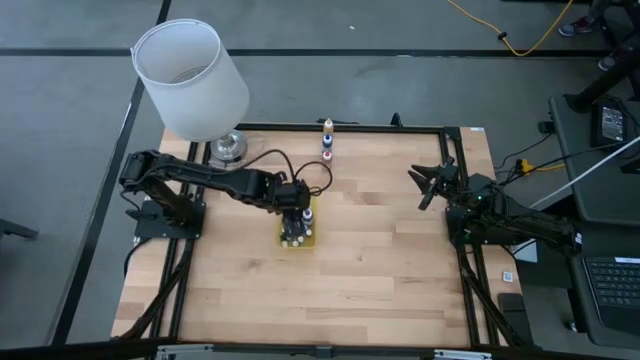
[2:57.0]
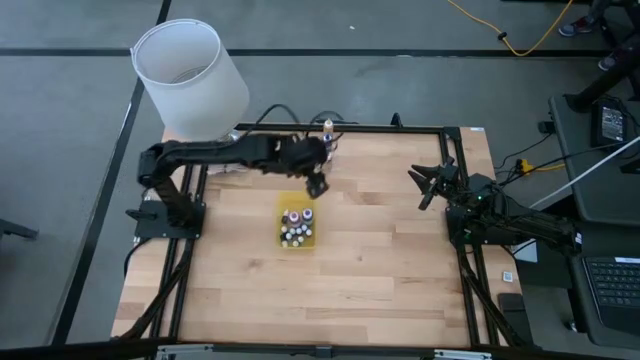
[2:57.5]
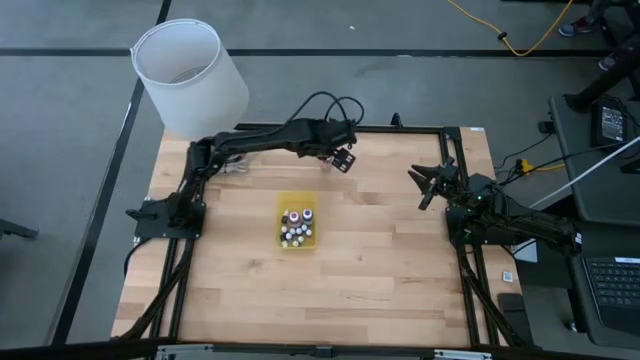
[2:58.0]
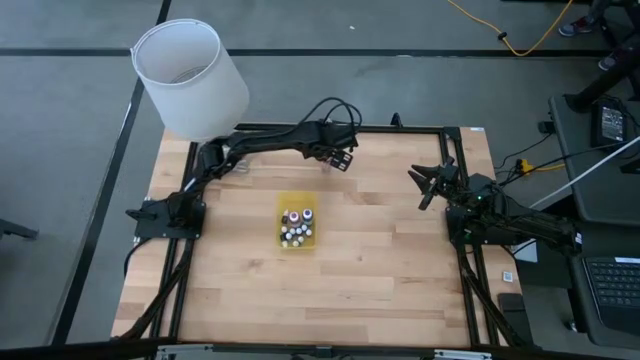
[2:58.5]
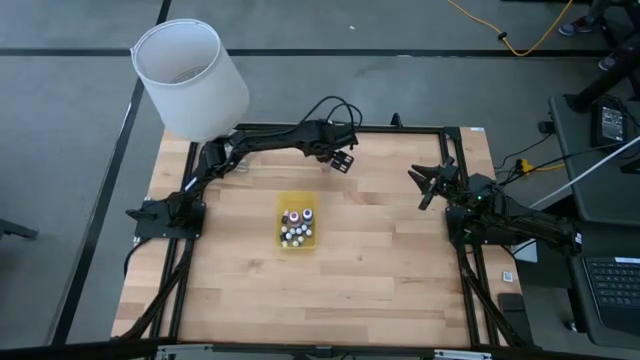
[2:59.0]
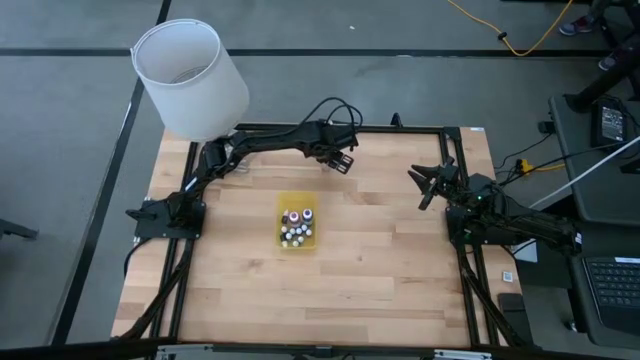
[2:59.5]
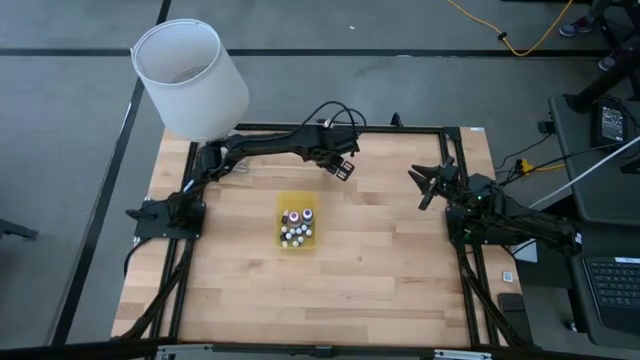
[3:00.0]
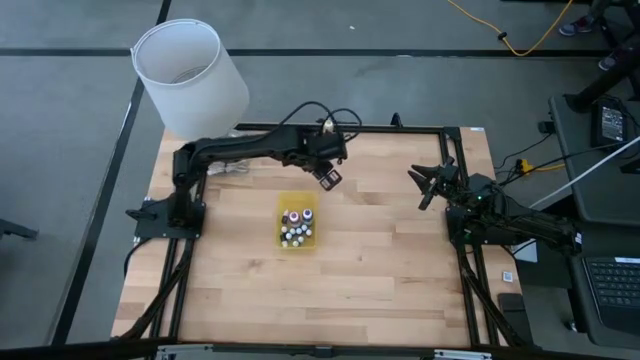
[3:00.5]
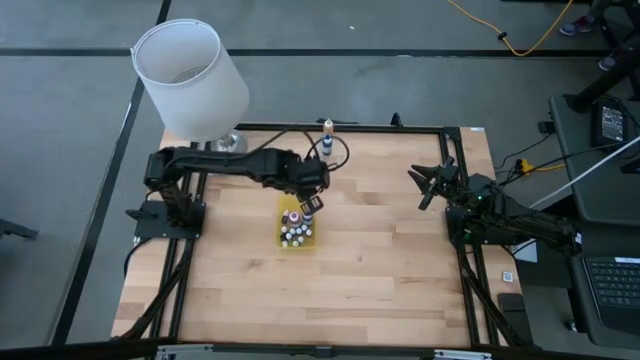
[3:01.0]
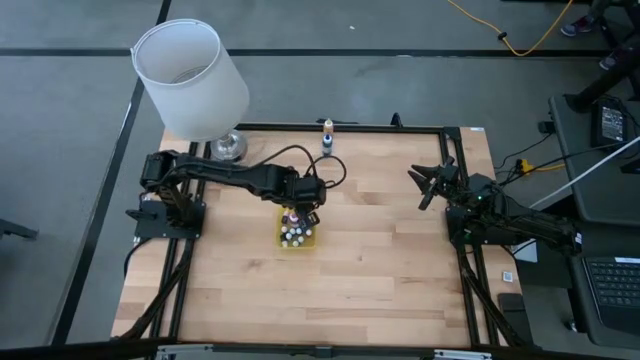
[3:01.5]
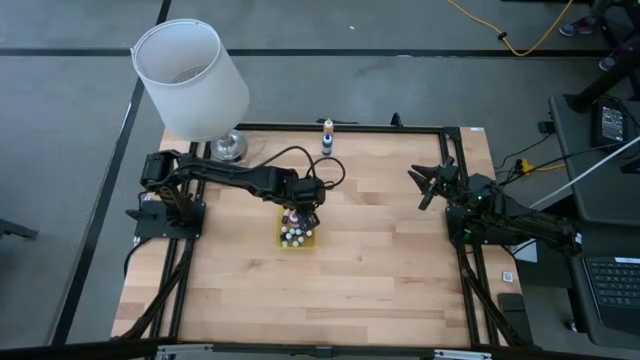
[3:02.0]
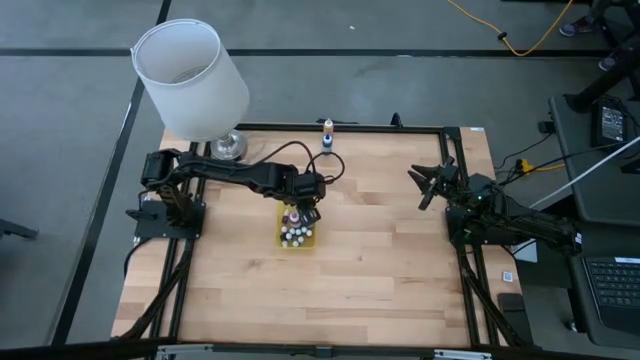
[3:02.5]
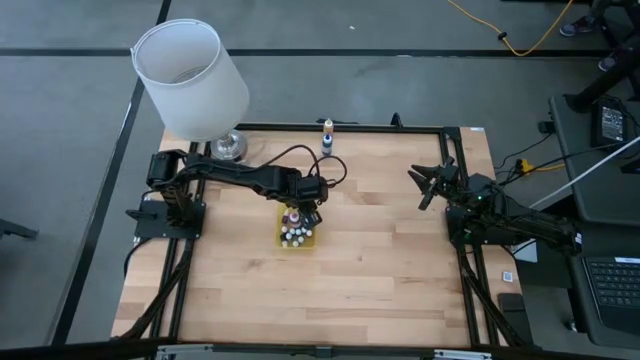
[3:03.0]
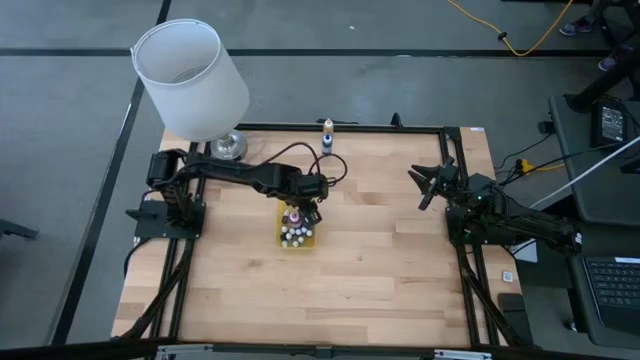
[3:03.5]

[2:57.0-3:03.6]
Task: Pick & Place food coloring
Put the large orange bottle into the yellow bin

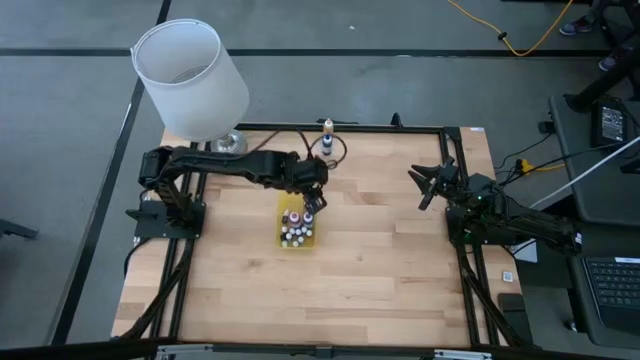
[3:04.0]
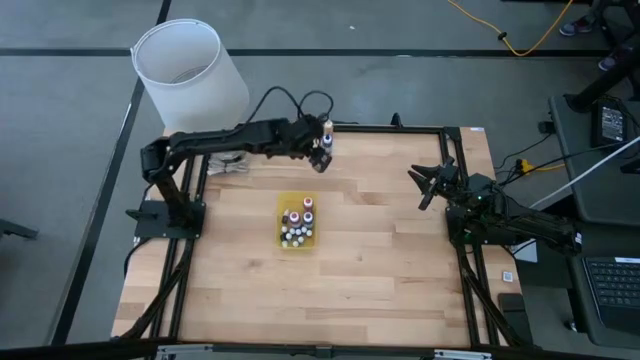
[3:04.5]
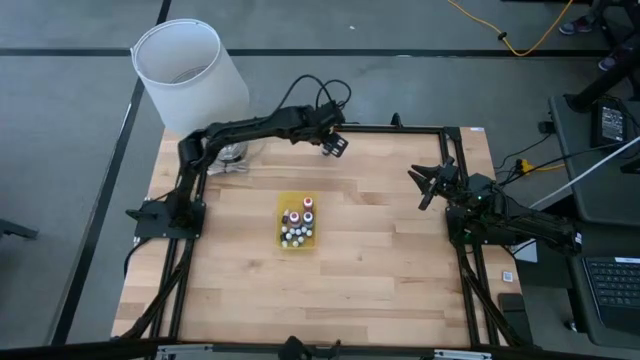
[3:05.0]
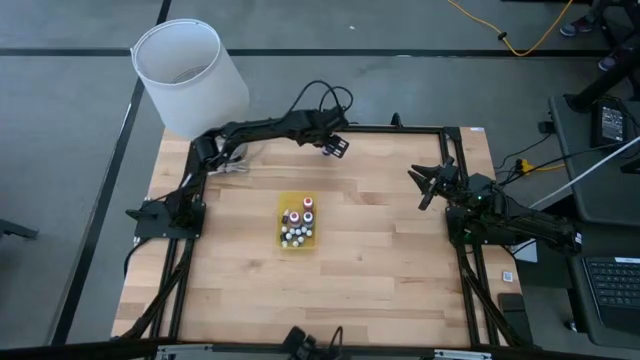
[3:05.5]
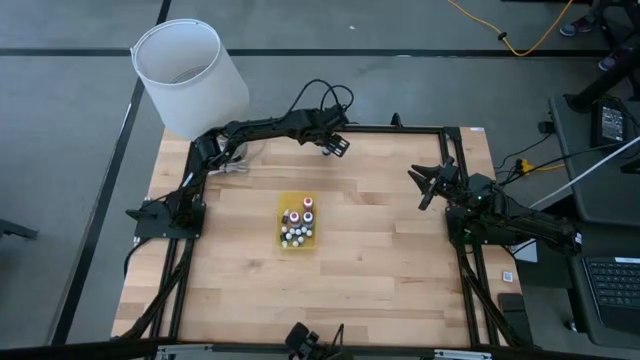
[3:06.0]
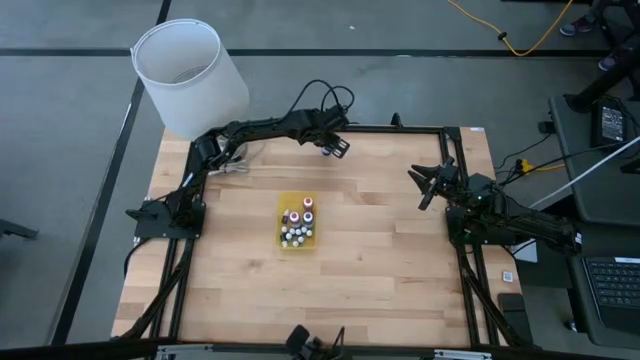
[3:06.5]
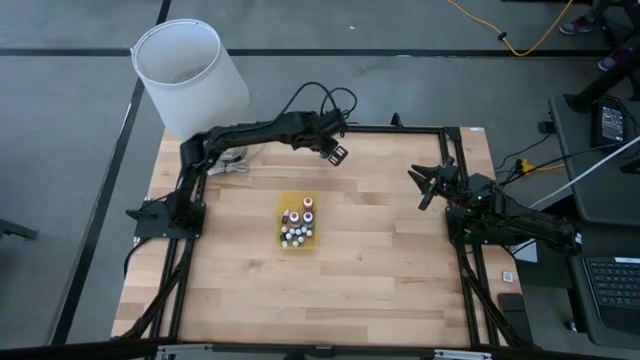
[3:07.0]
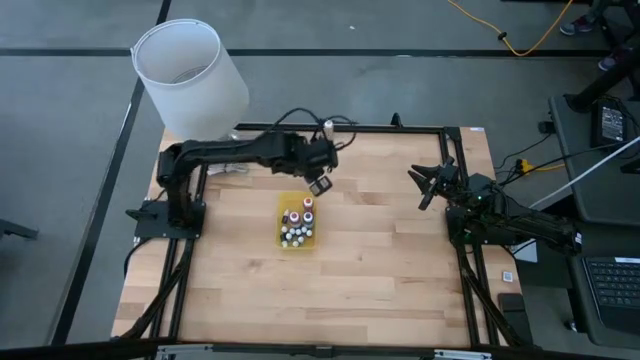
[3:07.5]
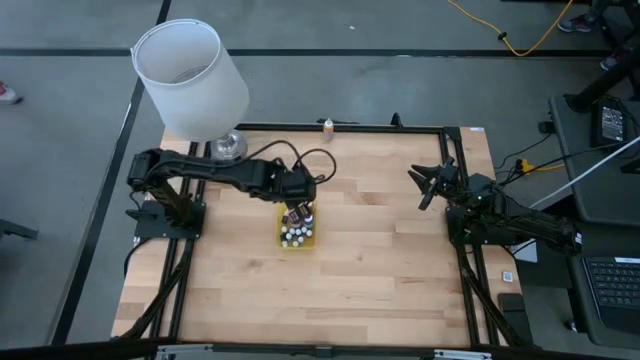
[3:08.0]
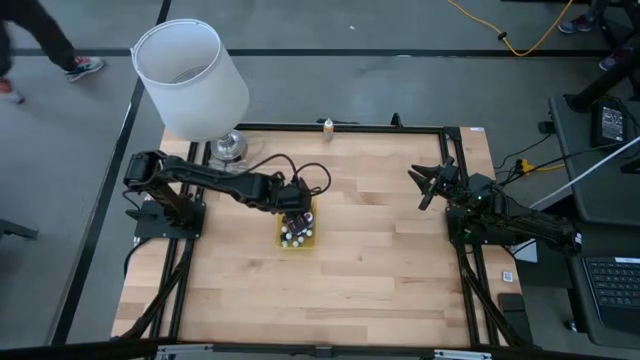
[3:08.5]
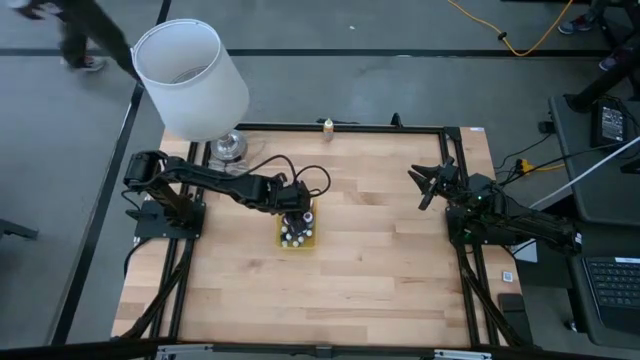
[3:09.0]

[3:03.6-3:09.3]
Put the large blue bottle into the yellow bin

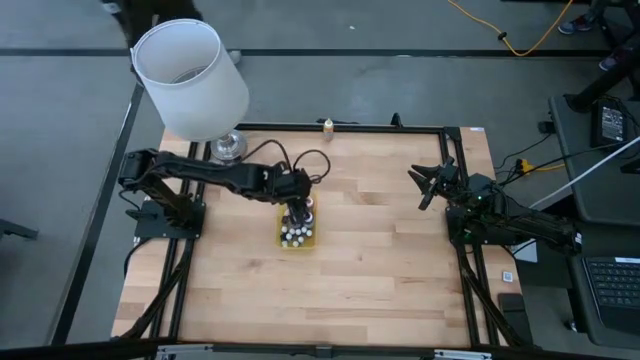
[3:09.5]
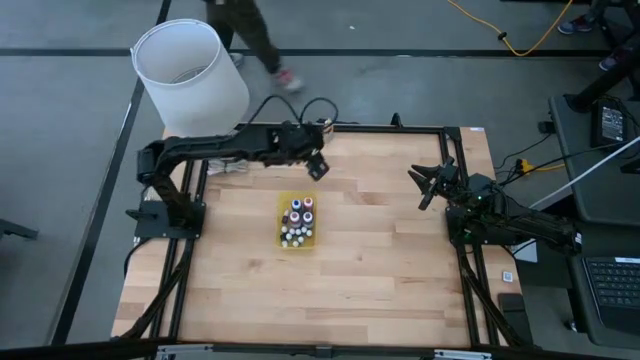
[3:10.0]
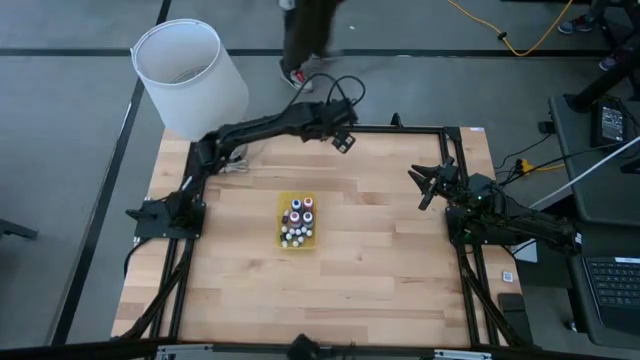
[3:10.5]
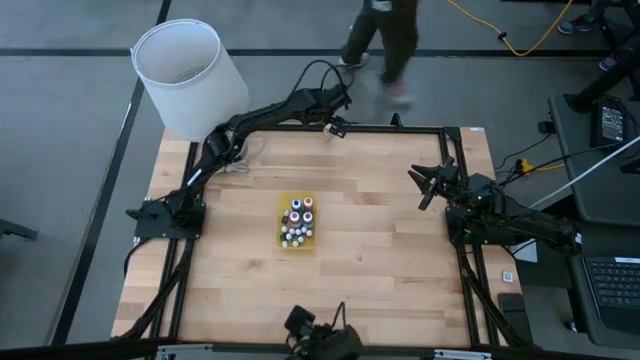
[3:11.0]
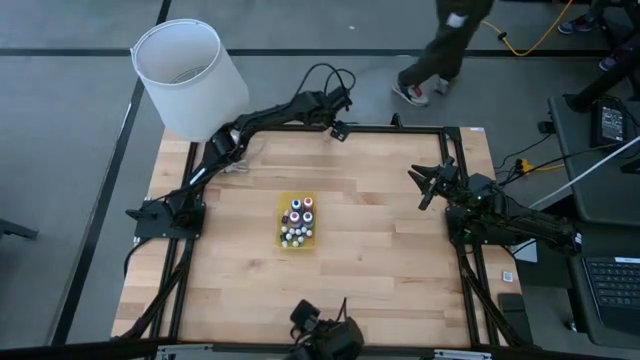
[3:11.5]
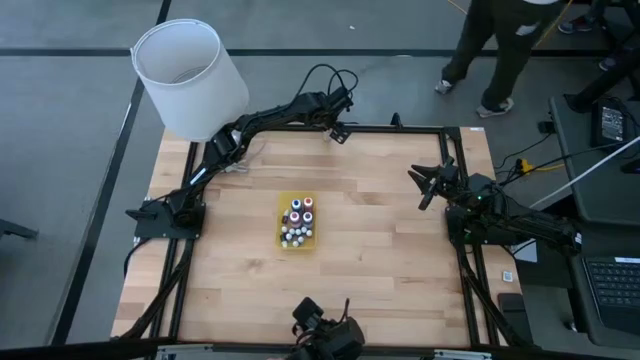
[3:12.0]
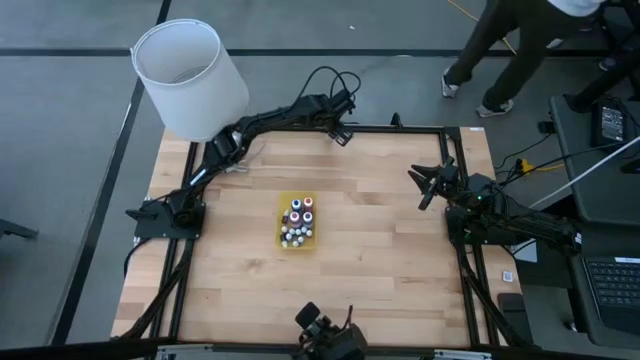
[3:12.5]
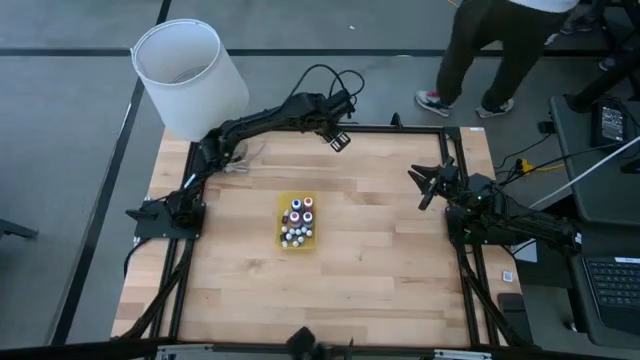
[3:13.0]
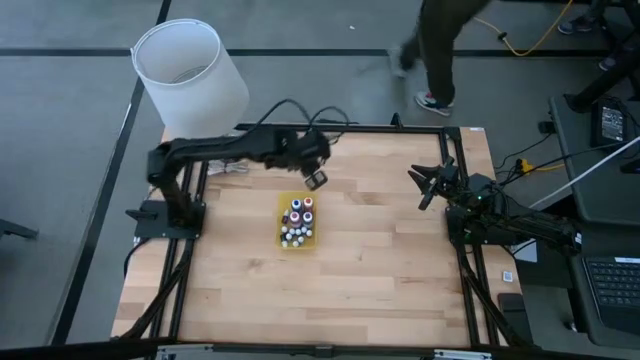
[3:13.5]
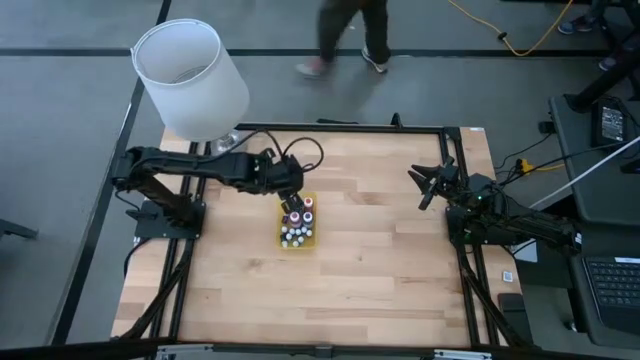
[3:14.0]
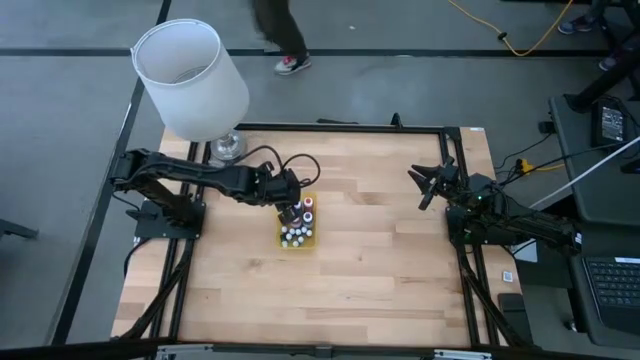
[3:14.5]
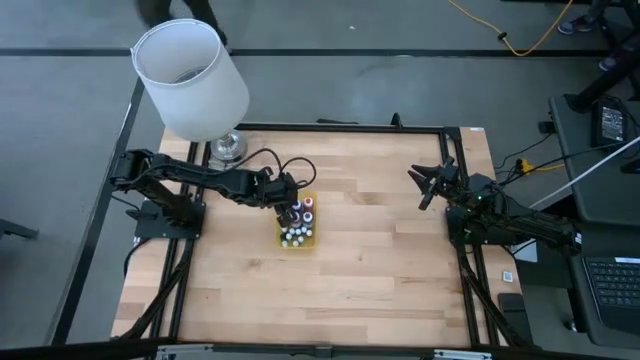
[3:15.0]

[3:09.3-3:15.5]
Put the large yellow bottle into the yellow bin

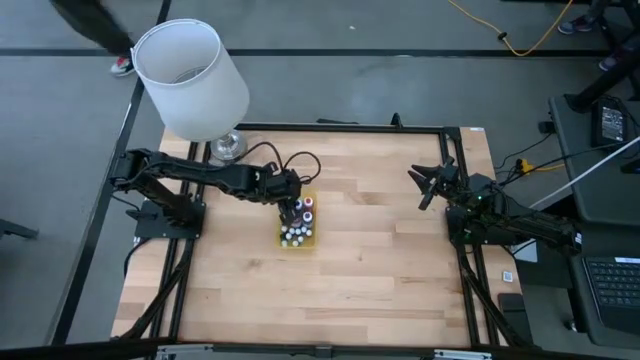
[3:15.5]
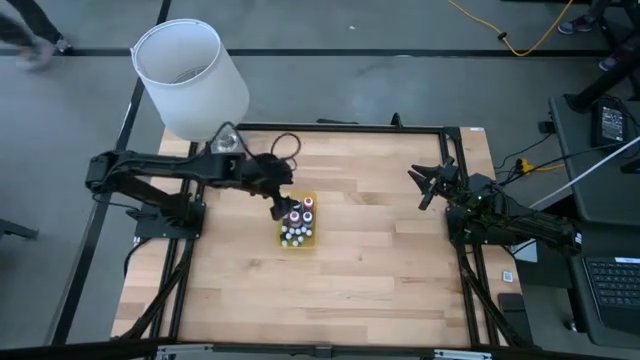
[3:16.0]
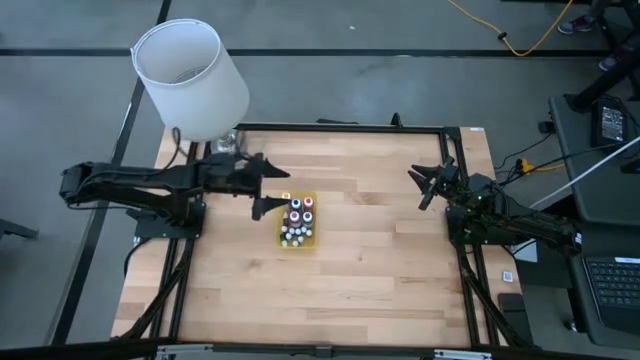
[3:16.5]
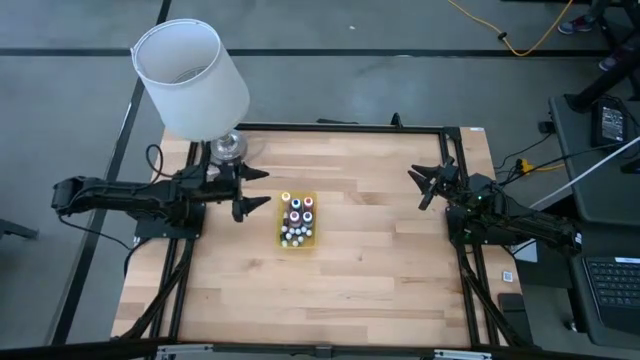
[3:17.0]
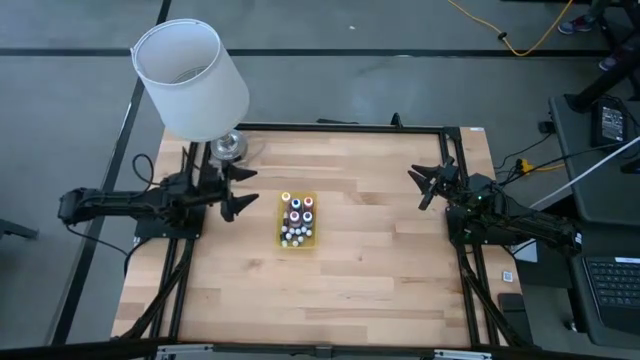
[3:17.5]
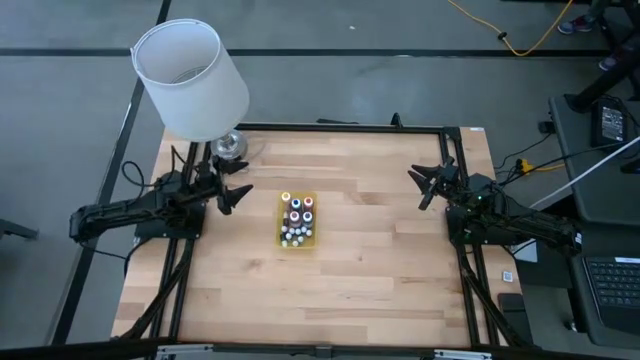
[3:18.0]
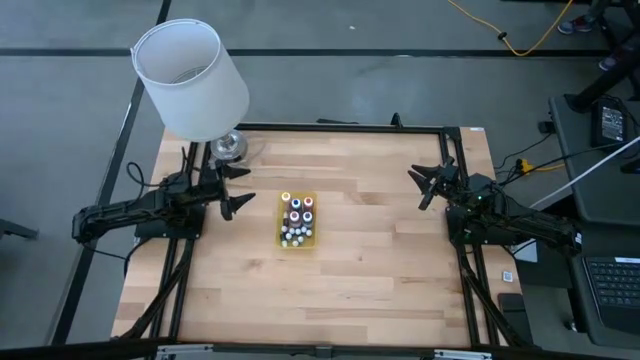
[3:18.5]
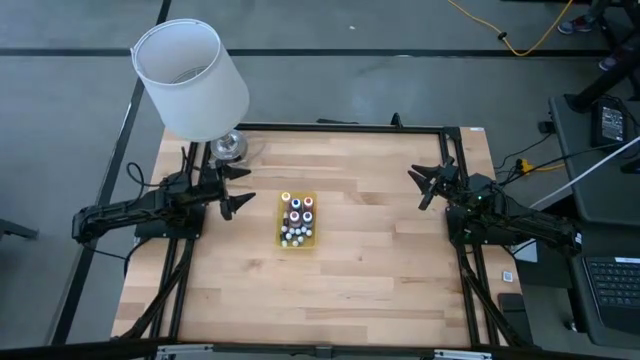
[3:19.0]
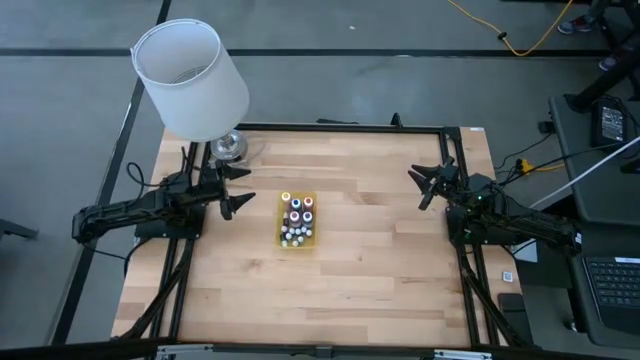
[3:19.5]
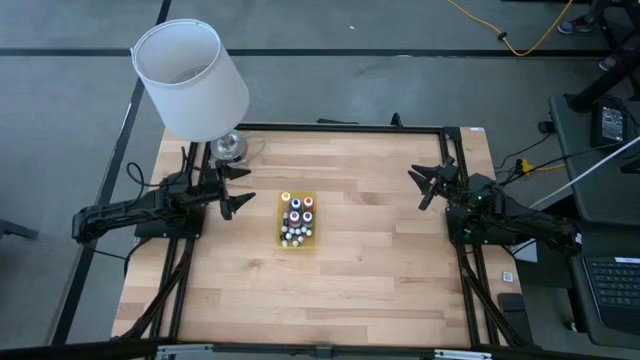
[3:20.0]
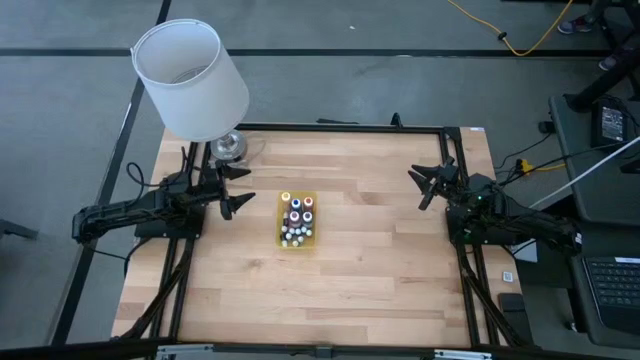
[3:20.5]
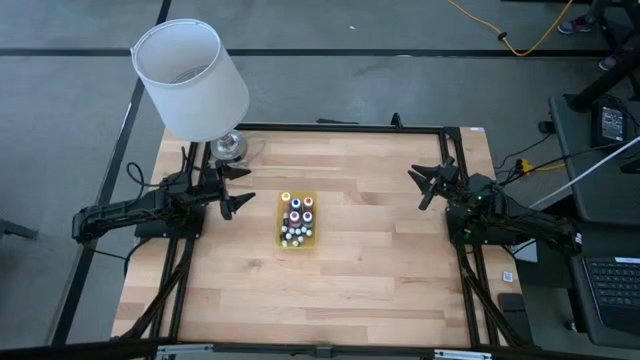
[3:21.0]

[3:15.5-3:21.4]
Return to Home Position
